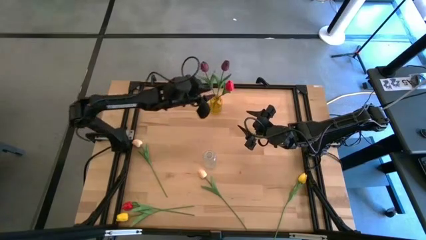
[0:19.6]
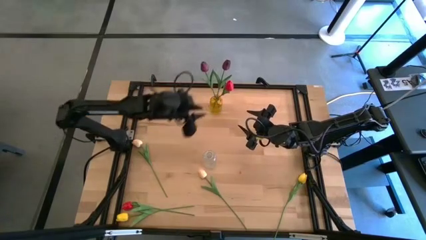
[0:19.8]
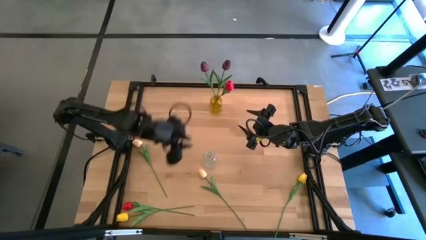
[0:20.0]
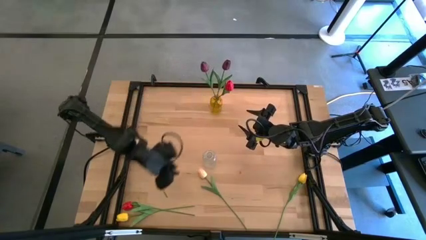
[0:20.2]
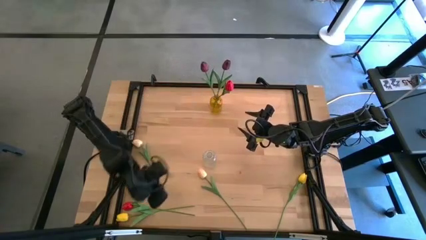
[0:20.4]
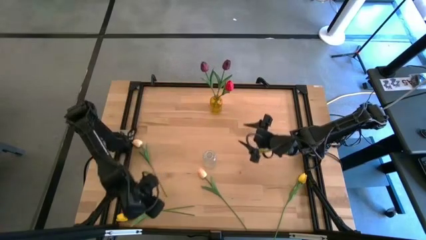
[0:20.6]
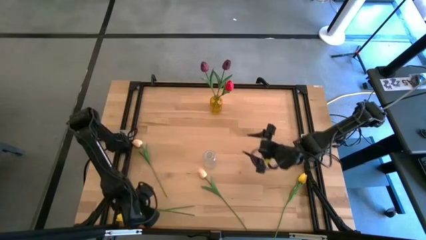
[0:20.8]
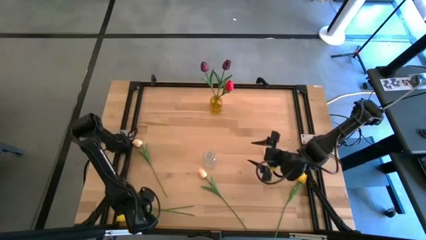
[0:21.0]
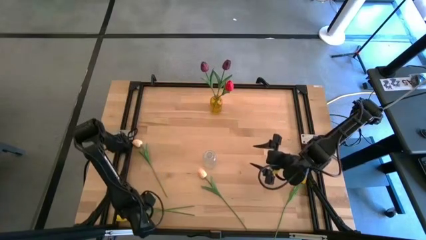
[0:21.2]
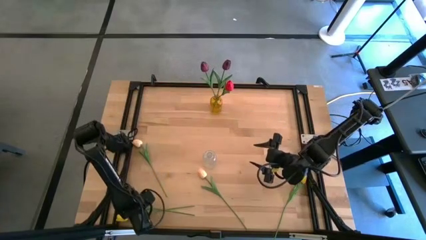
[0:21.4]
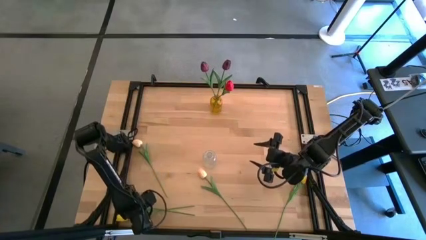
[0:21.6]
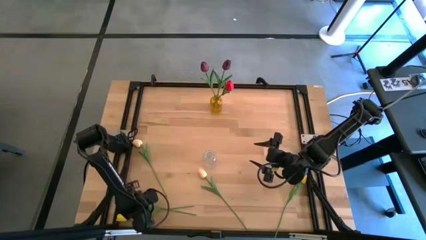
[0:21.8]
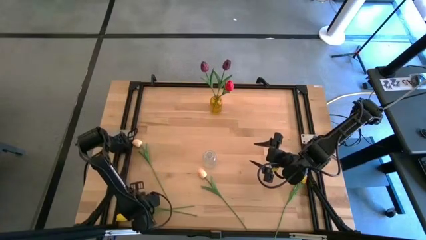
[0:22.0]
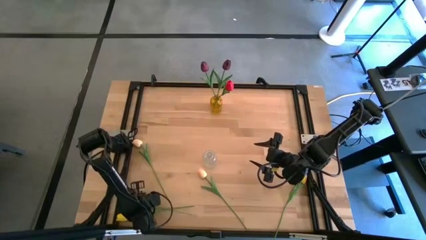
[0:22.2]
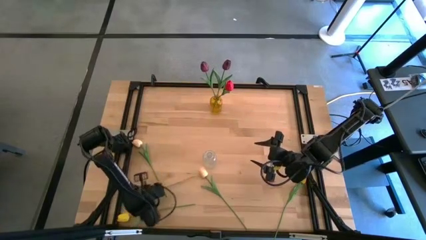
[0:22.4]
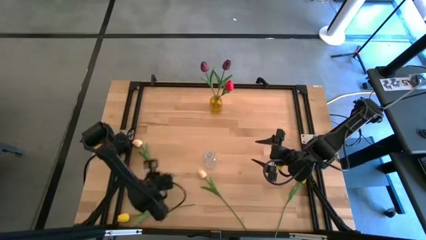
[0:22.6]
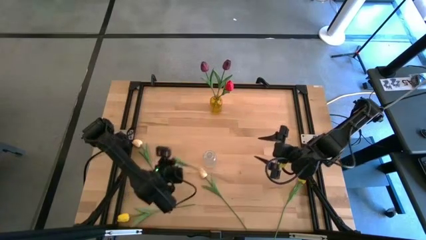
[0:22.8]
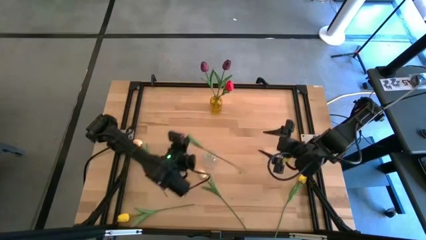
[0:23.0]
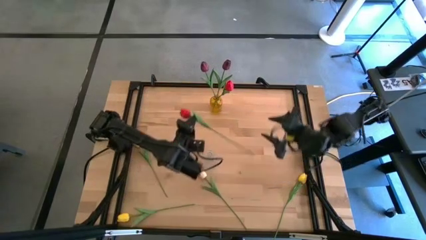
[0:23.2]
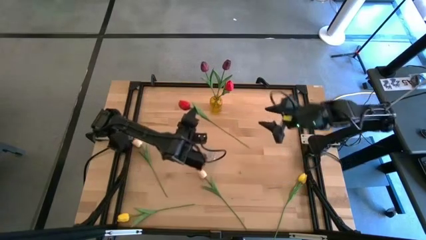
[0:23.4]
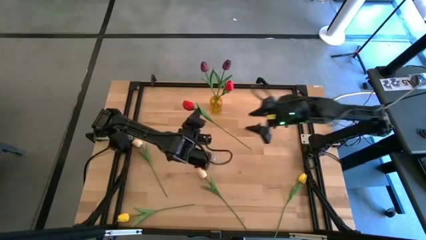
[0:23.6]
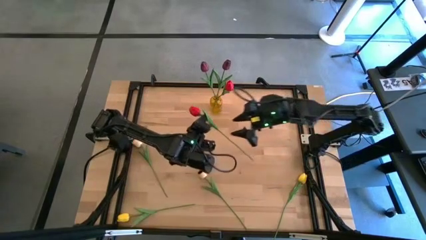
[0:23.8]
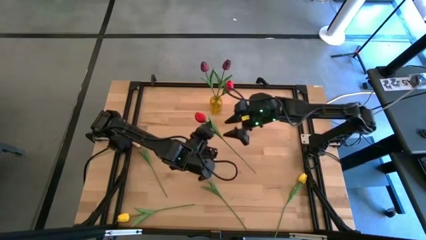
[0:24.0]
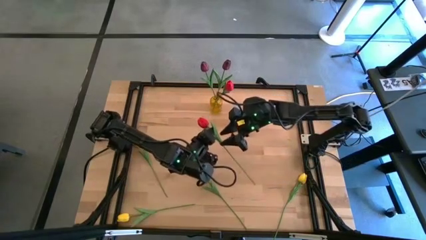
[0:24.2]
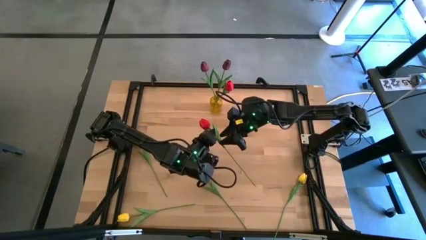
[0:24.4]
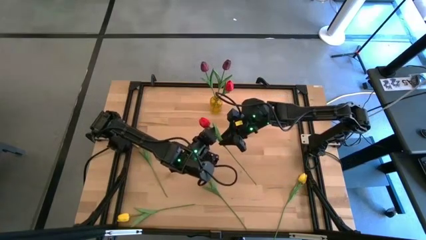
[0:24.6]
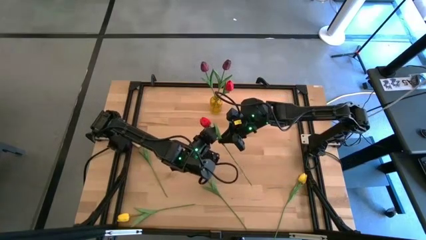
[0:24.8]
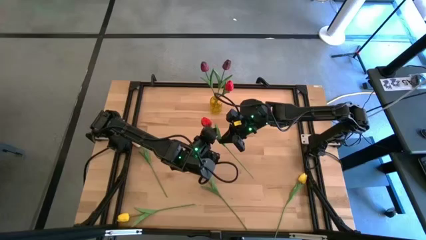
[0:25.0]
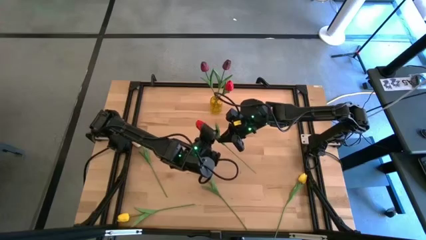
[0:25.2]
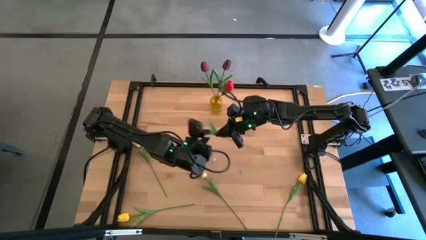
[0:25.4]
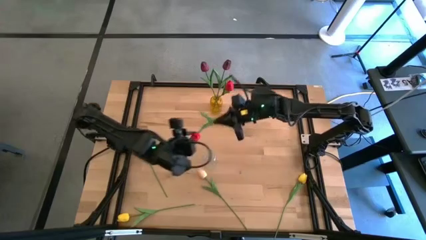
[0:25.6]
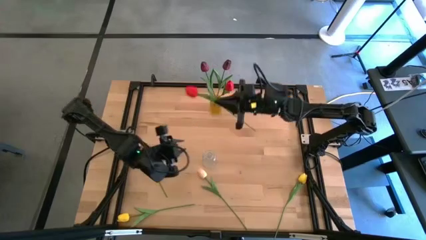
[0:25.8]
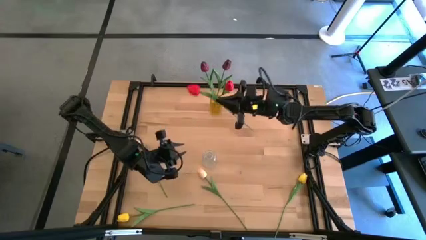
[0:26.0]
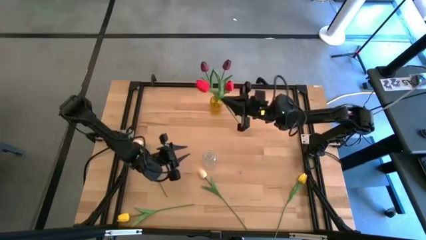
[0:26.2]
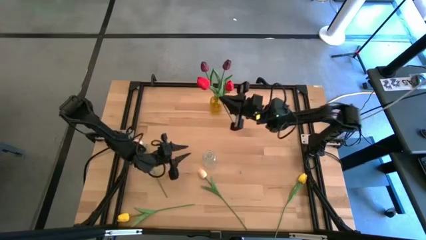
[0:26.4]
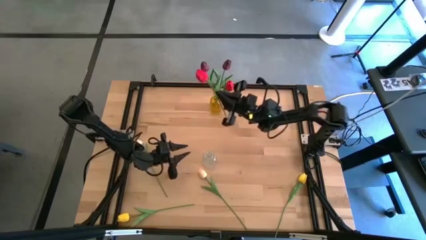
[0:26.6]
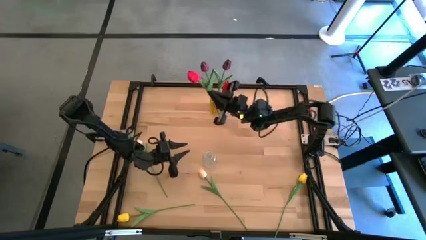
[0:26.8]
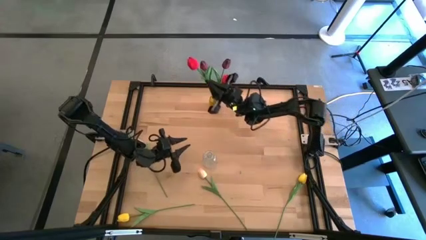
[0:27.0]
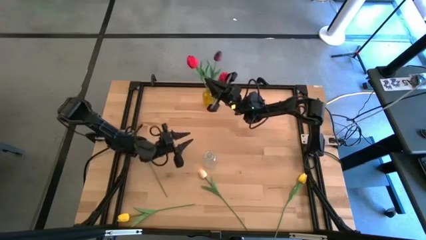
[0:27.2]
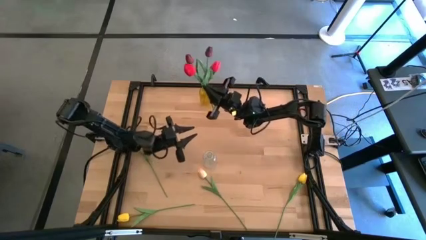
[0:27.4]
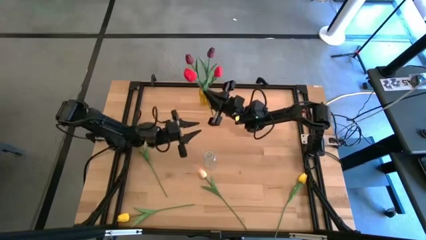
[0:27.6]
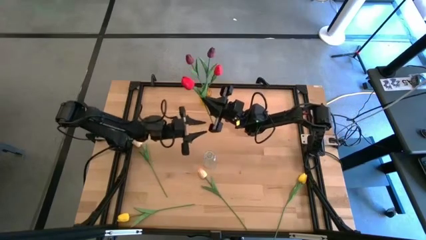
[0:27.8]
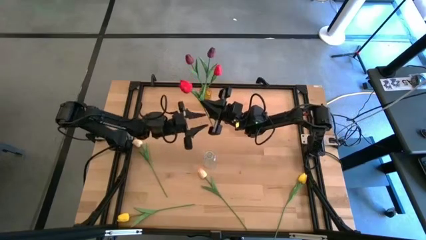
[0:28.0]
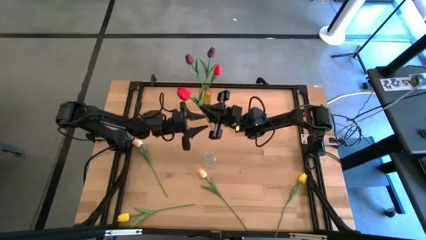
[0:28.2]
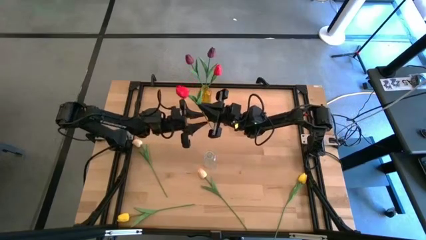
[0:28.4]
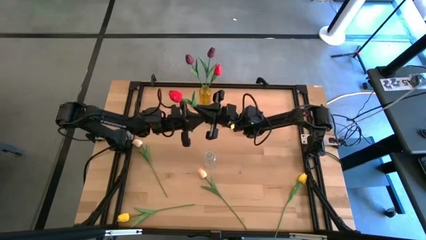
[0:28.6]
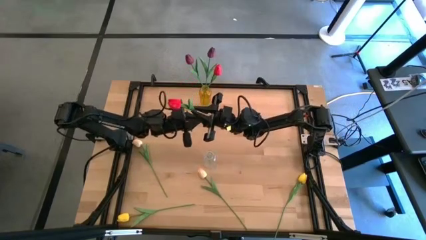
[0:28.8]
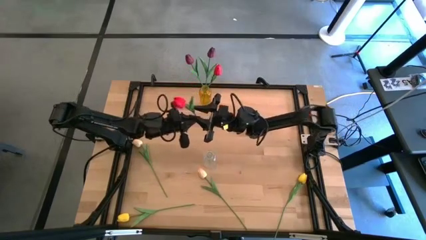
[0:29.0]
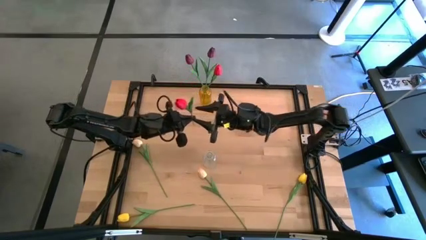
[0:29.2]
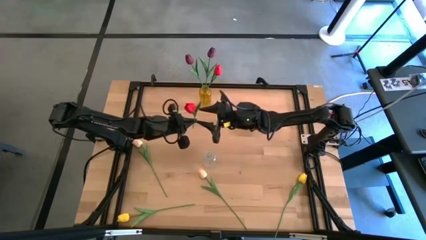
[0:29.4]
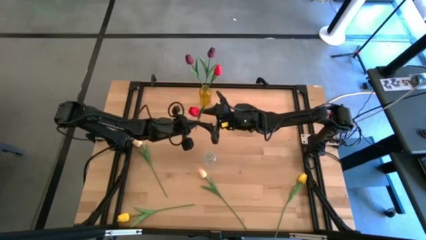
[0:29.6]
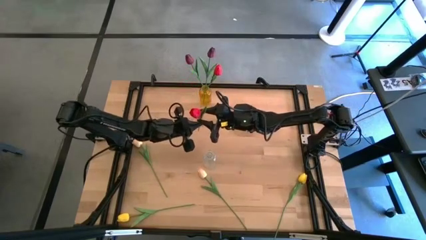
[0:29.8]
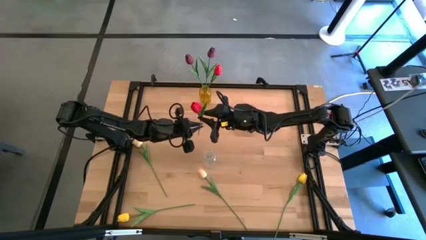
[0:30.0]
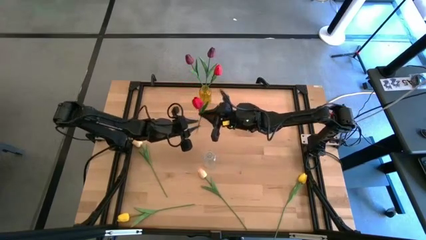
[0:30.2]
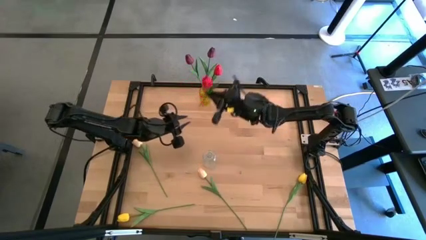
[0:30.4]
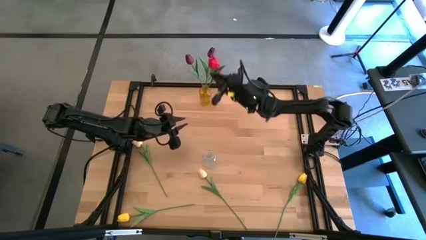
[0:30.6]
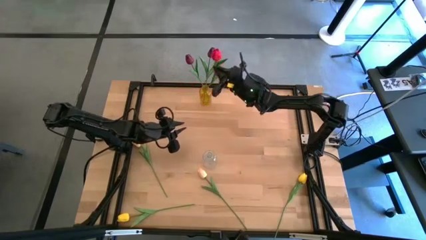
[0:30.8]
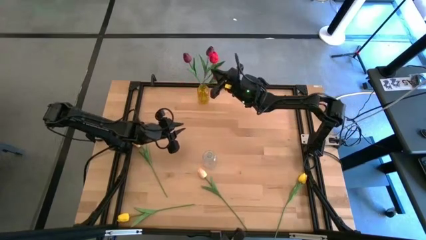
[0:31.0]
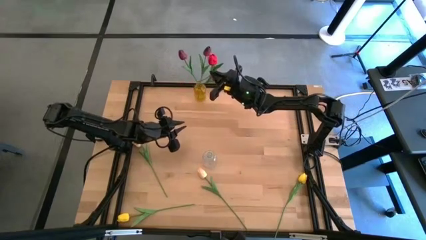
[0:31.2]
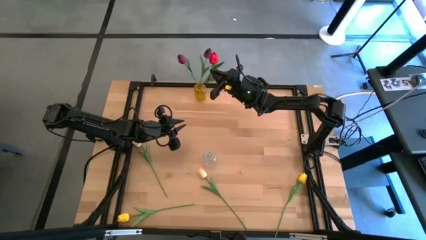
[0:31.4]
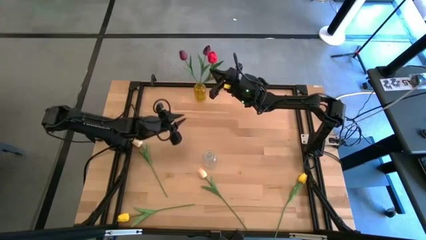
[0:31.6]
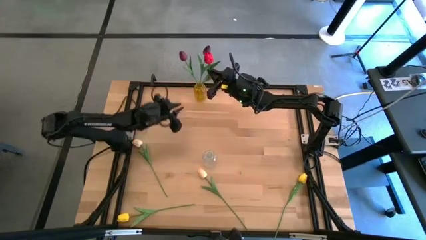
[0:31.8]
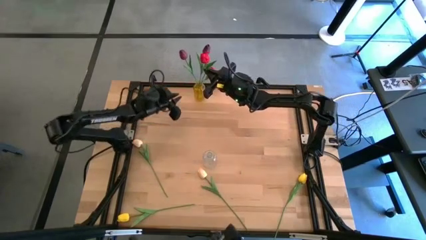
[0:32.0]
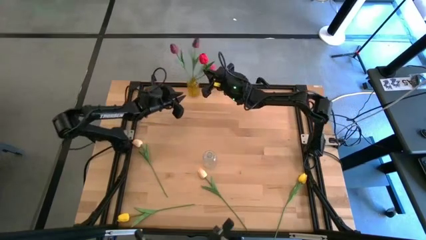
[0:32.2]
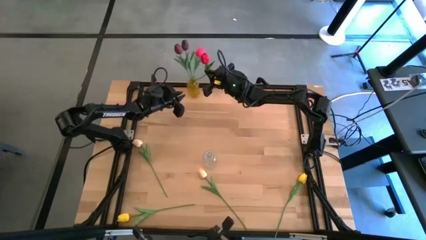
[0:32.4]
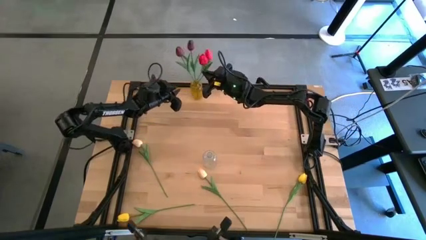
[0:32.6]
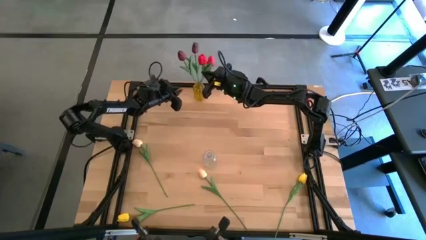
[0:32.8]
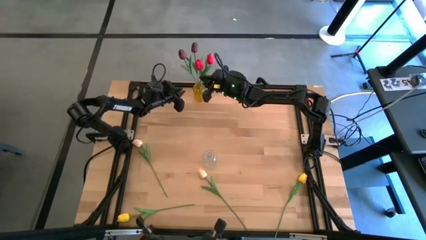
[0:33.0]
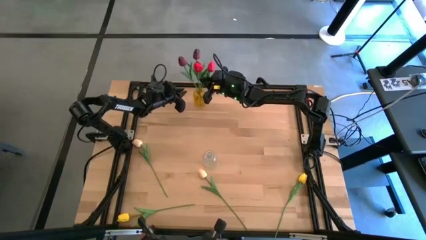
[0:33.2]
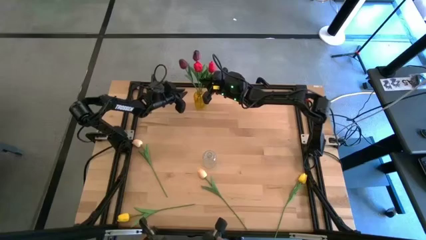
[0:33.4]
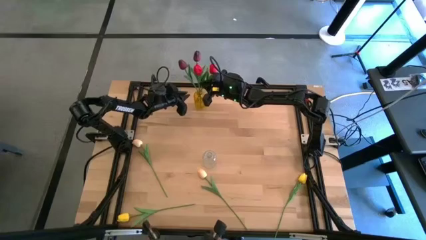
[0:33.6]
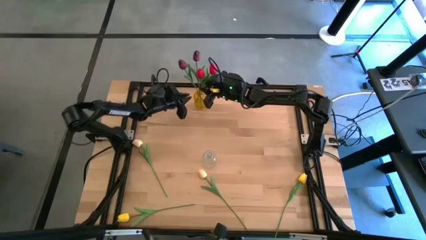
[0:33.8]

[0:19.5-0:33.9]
Task: Sort flowers into vase by color
Put the red flower into the yellow vase

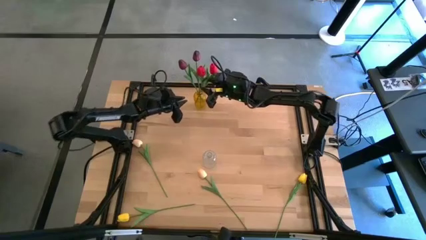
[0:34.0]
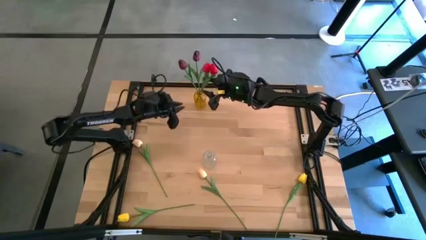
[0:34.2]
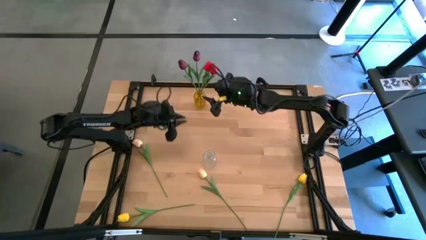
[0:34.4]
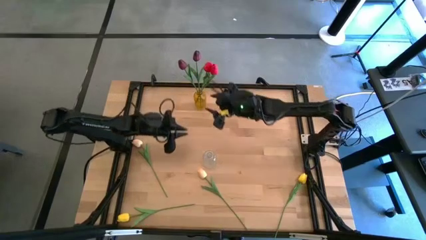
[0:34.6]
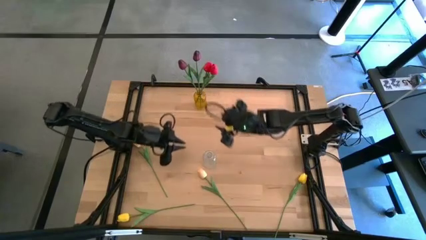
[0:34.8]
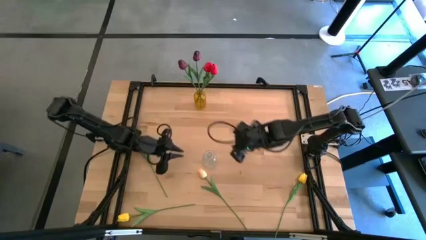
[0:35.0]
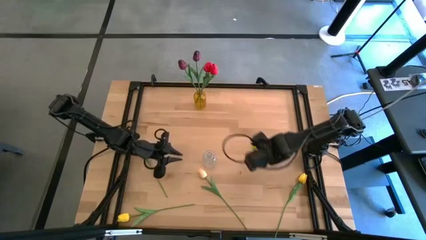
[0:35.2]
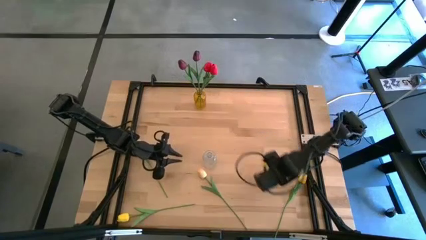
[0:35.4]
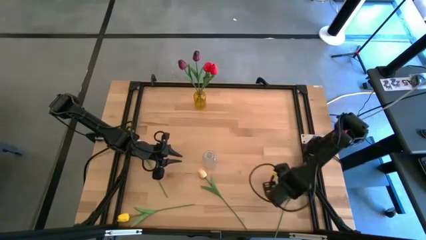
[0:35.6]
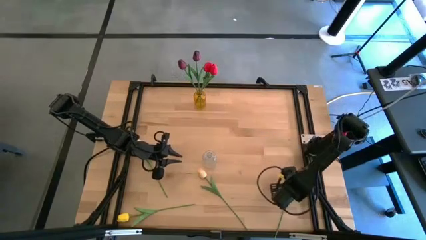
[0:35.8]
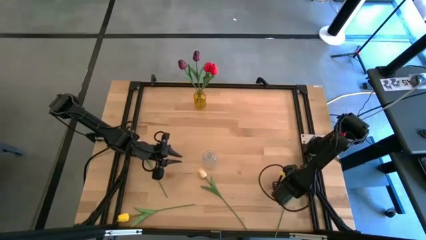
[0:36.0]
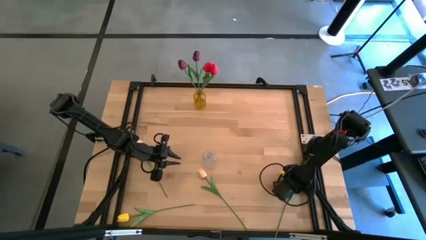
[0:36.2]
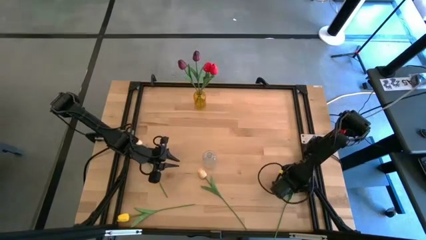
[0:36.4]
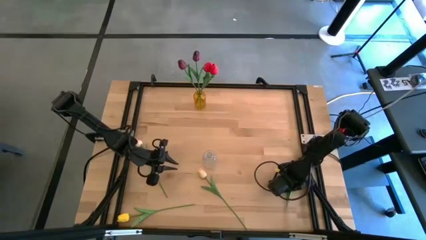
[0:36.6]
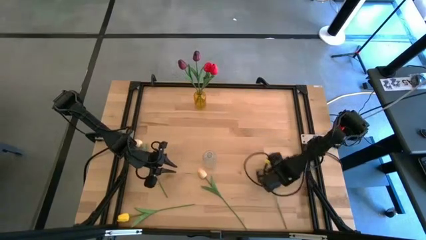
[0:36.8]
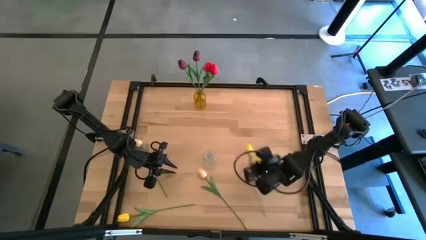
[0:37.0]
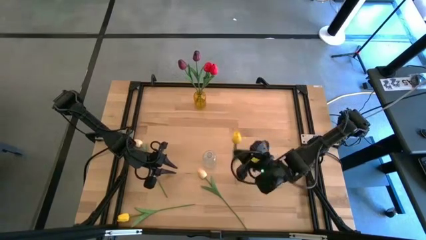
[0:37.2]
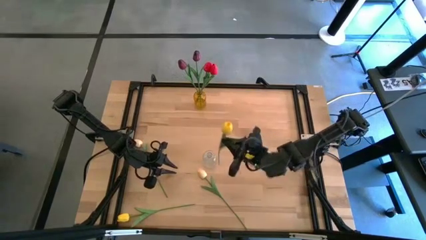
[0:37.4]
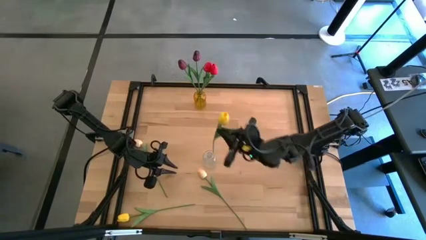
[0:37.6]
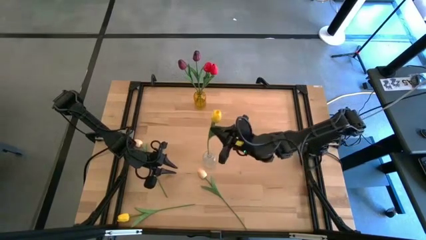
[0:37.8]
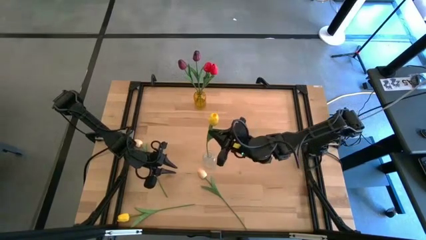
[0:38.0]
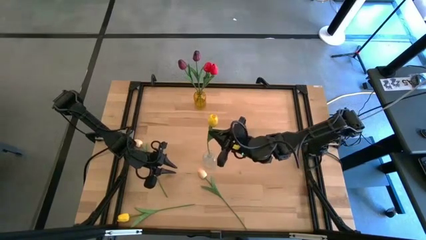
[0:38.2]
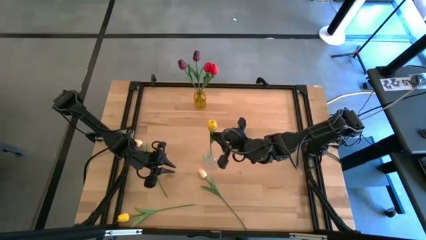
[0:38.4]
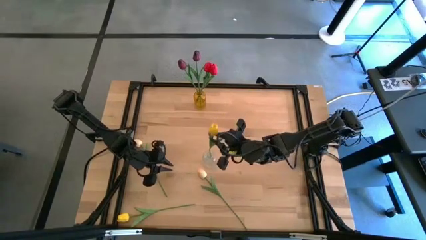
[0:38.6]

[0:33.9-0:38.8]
Put the right yellow flower into the transparent vase
